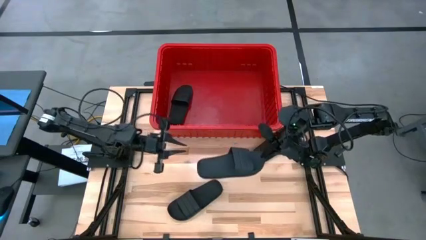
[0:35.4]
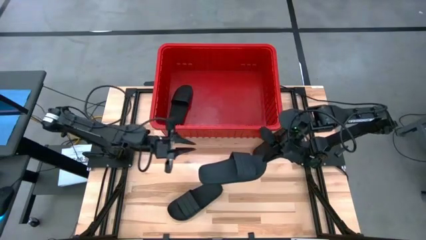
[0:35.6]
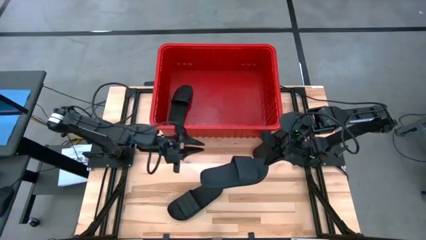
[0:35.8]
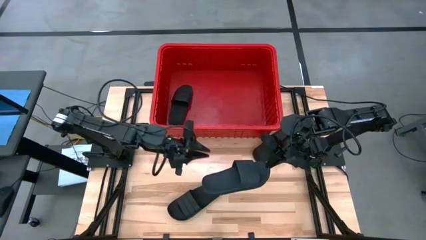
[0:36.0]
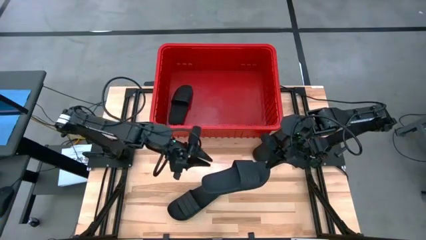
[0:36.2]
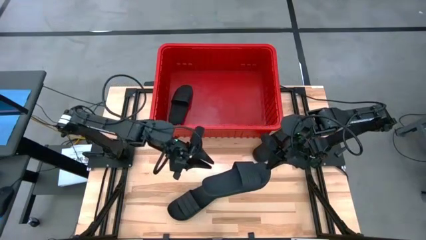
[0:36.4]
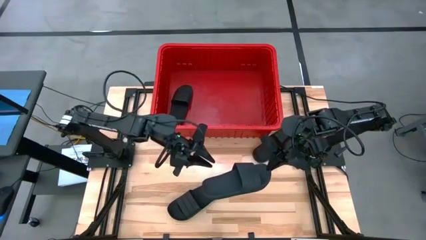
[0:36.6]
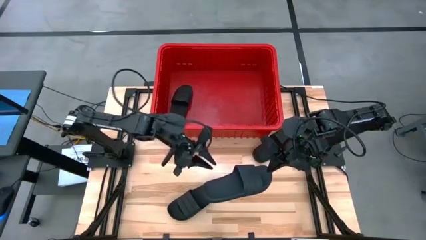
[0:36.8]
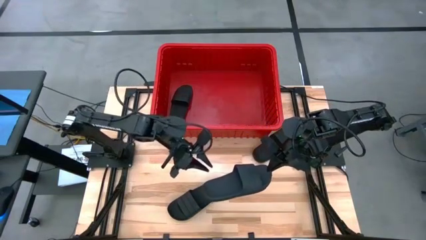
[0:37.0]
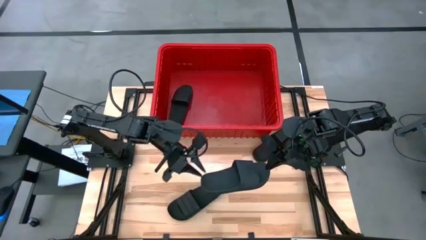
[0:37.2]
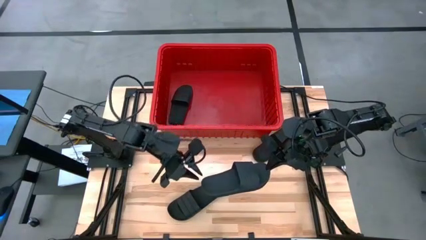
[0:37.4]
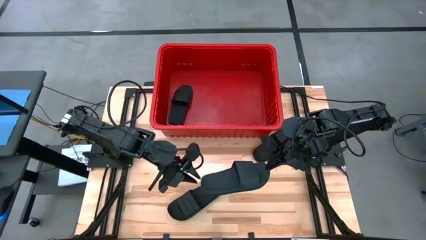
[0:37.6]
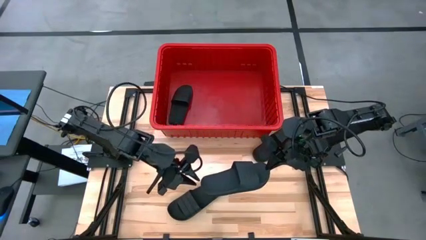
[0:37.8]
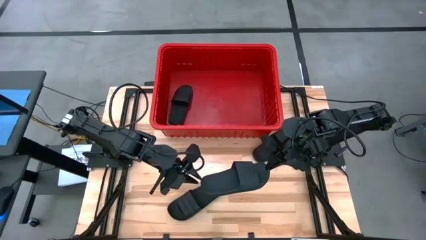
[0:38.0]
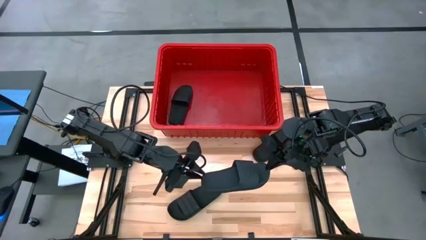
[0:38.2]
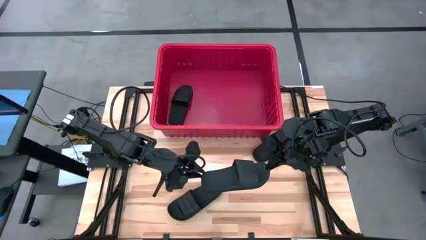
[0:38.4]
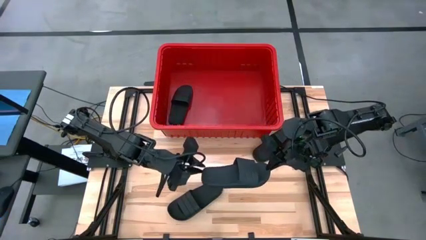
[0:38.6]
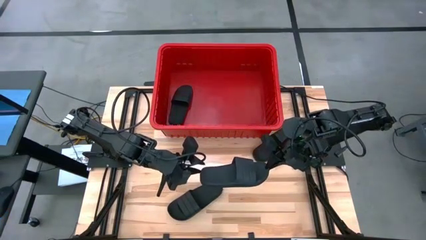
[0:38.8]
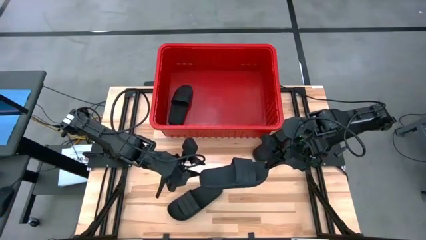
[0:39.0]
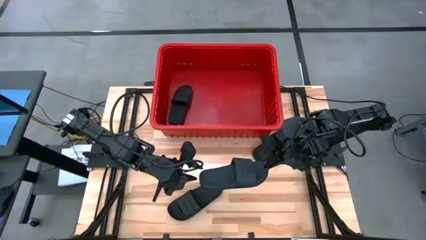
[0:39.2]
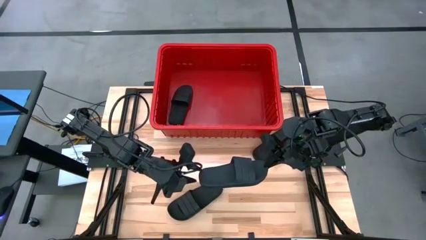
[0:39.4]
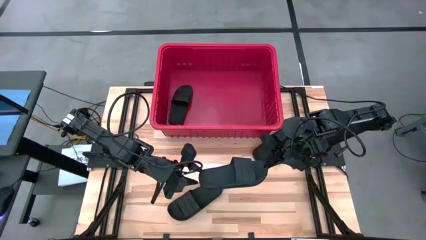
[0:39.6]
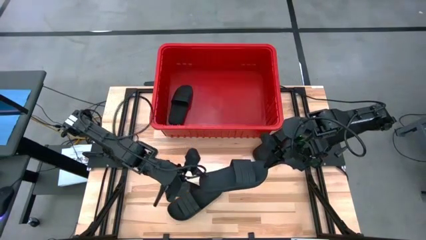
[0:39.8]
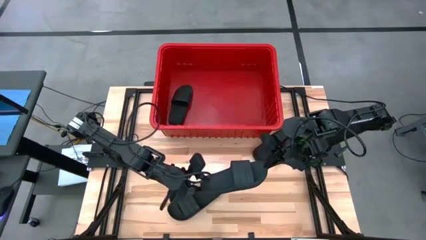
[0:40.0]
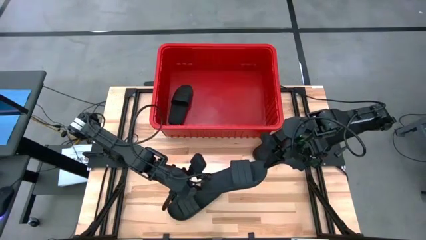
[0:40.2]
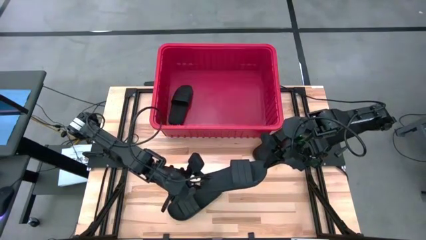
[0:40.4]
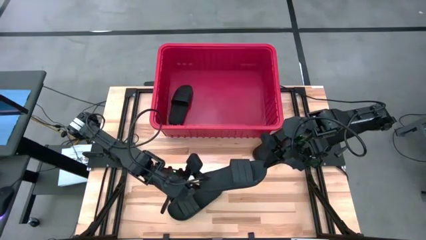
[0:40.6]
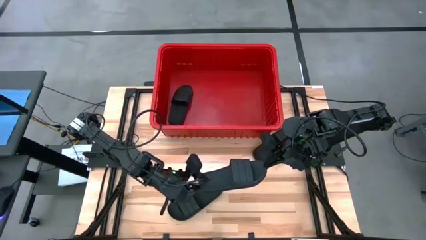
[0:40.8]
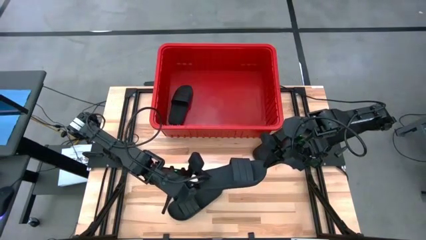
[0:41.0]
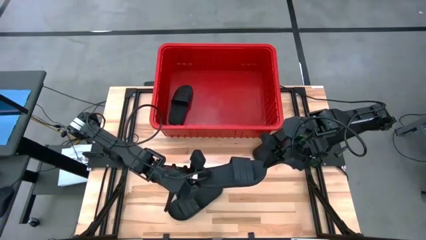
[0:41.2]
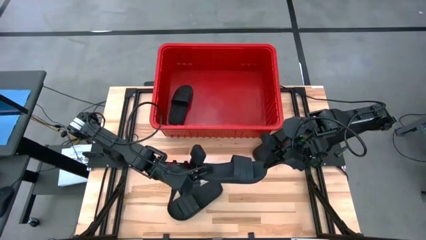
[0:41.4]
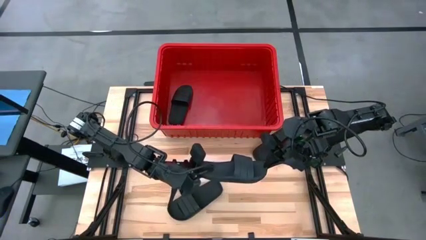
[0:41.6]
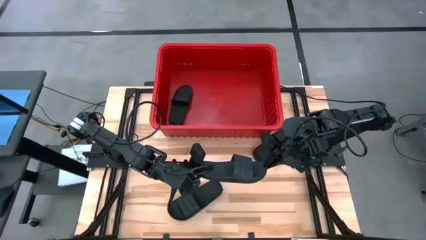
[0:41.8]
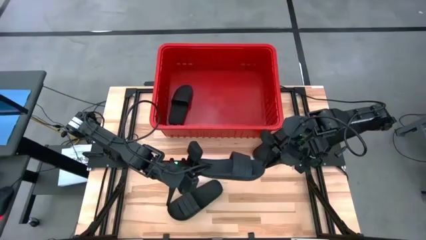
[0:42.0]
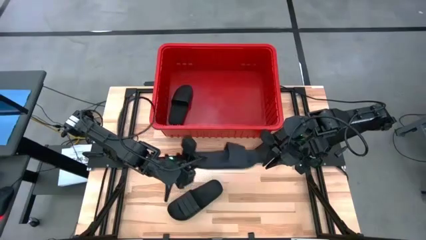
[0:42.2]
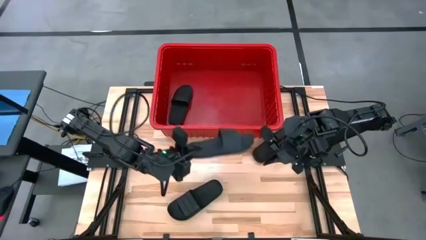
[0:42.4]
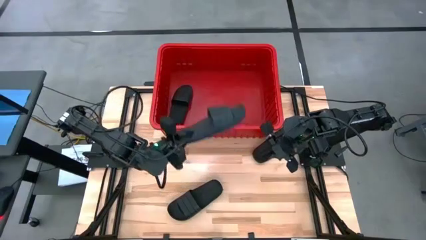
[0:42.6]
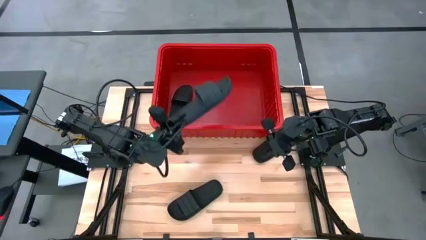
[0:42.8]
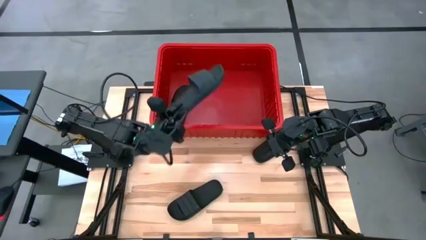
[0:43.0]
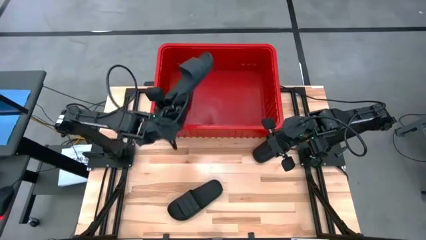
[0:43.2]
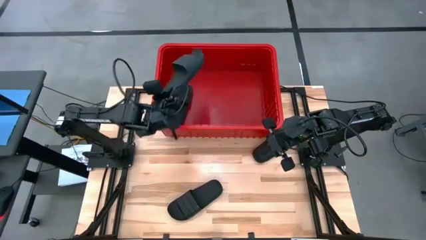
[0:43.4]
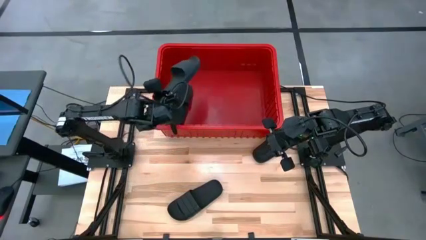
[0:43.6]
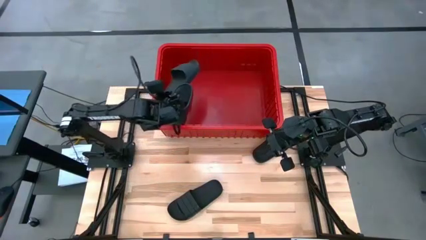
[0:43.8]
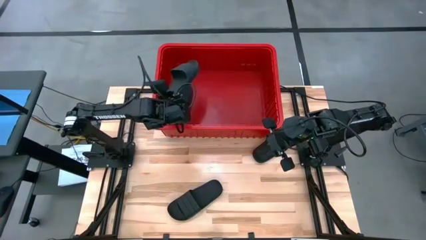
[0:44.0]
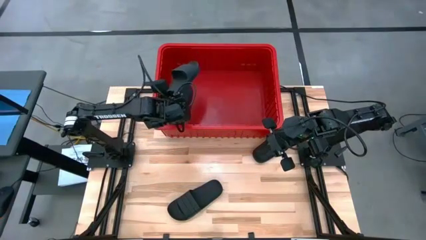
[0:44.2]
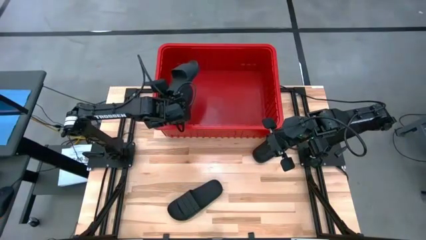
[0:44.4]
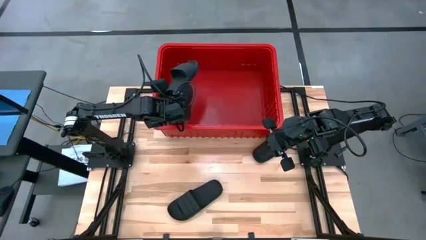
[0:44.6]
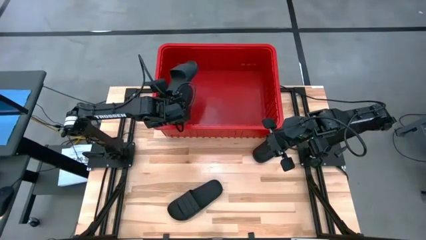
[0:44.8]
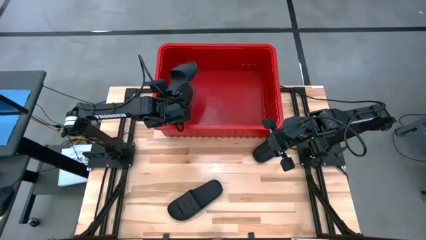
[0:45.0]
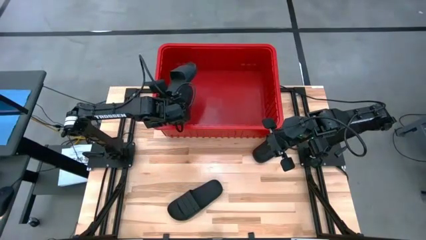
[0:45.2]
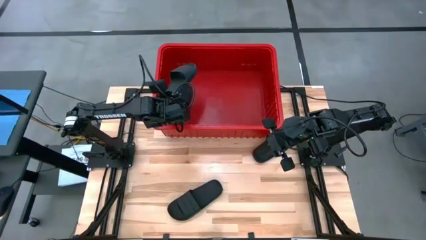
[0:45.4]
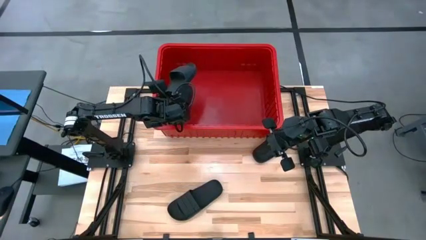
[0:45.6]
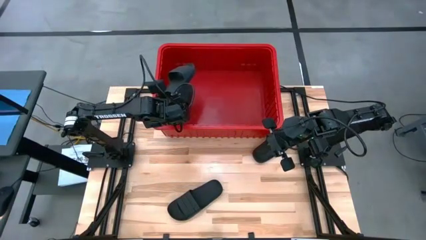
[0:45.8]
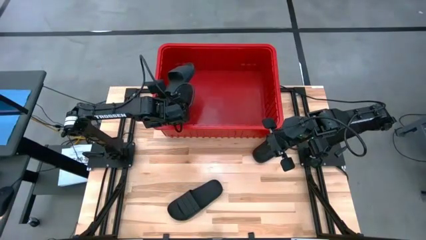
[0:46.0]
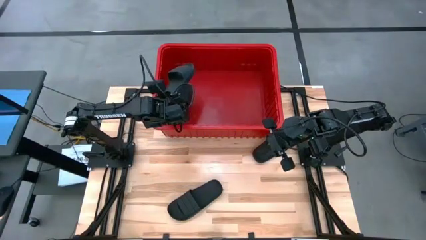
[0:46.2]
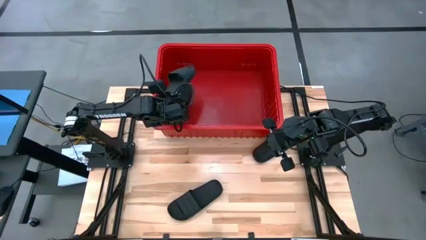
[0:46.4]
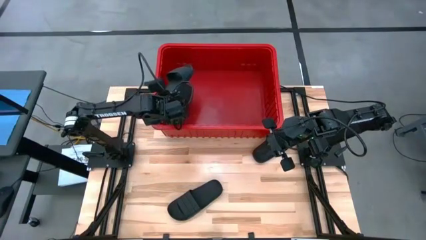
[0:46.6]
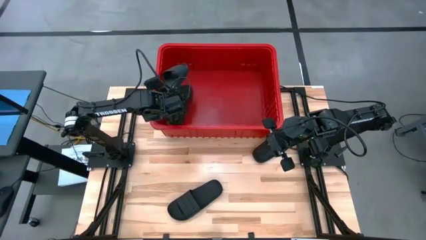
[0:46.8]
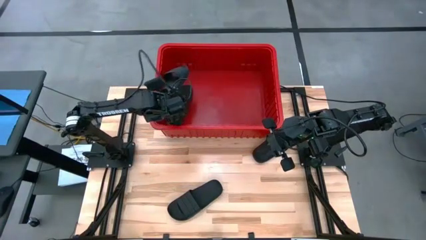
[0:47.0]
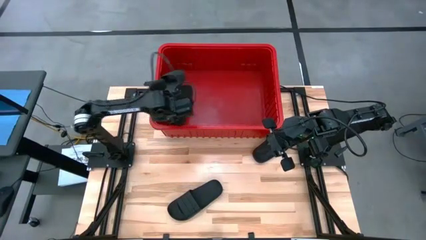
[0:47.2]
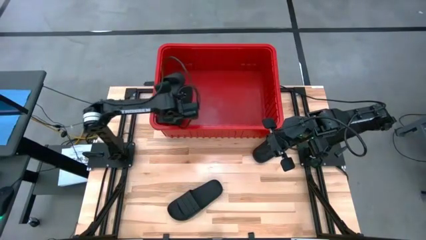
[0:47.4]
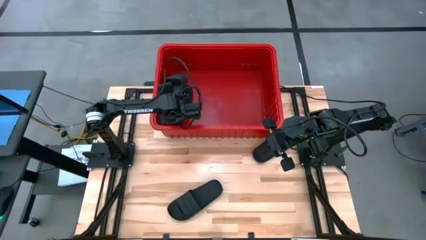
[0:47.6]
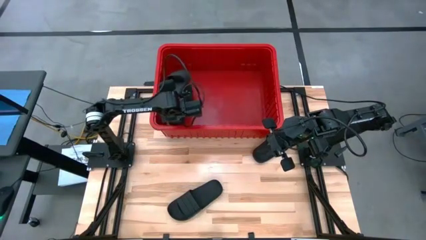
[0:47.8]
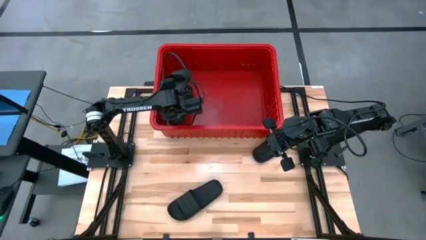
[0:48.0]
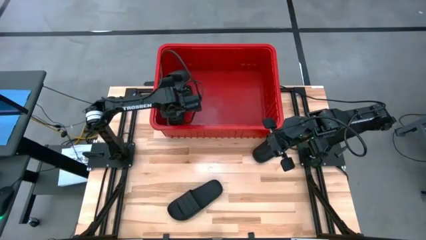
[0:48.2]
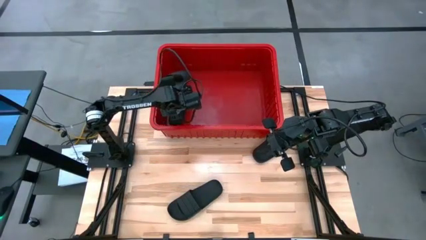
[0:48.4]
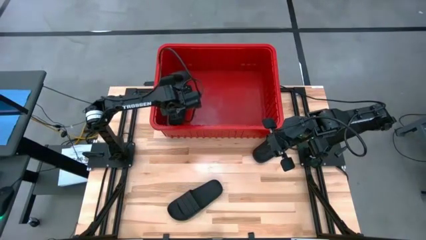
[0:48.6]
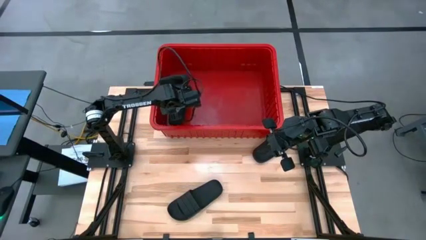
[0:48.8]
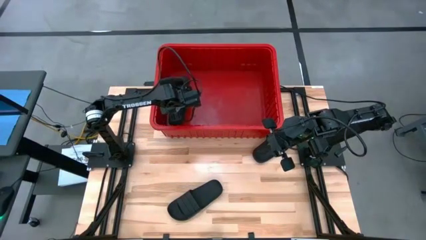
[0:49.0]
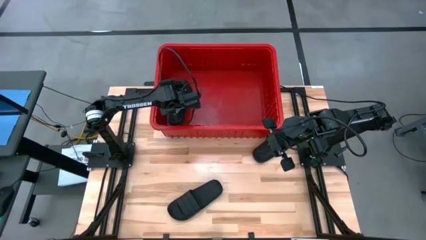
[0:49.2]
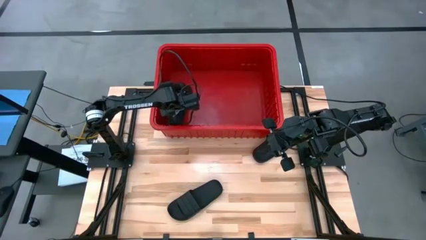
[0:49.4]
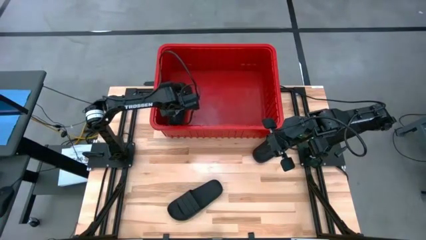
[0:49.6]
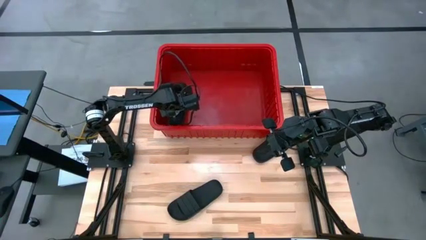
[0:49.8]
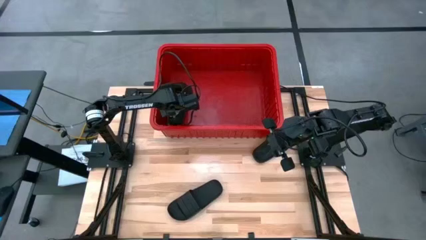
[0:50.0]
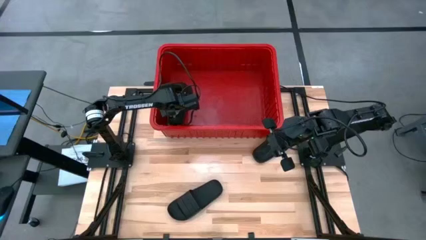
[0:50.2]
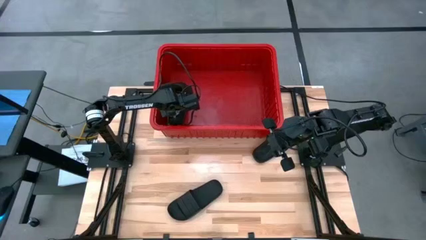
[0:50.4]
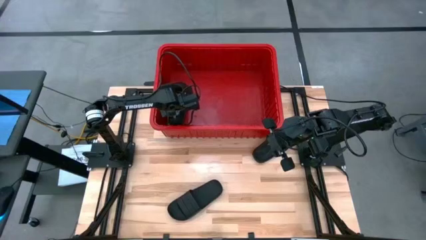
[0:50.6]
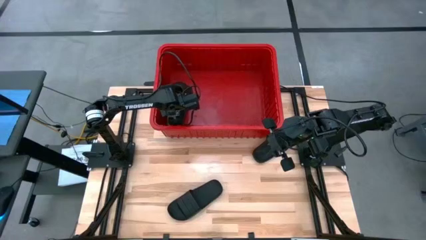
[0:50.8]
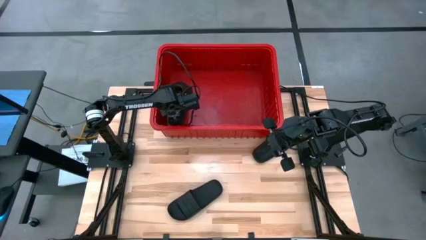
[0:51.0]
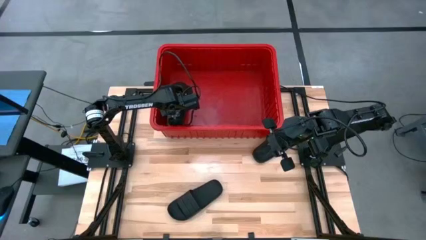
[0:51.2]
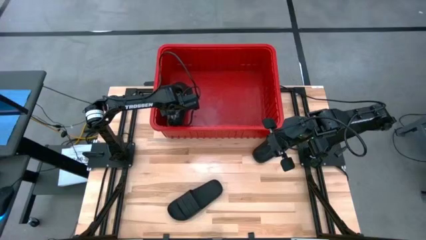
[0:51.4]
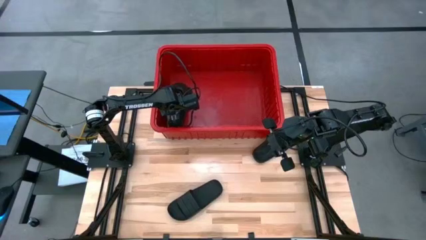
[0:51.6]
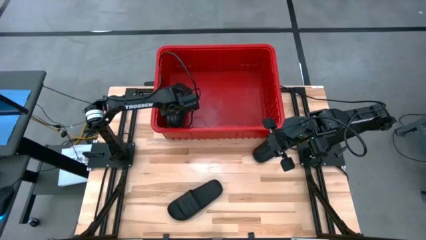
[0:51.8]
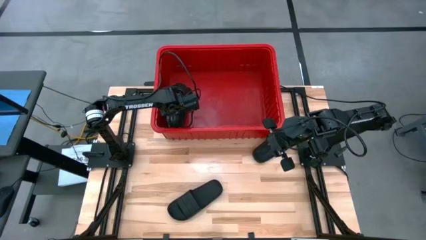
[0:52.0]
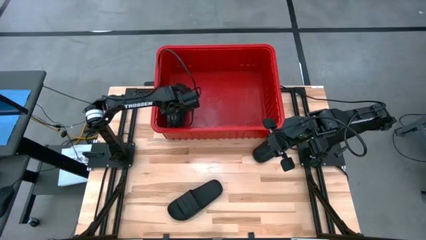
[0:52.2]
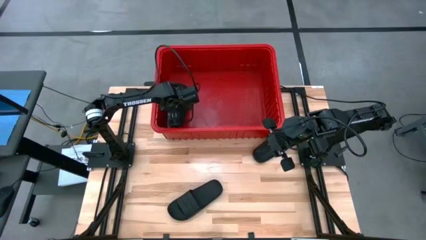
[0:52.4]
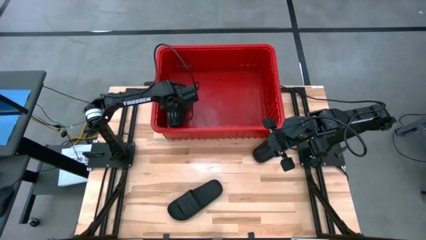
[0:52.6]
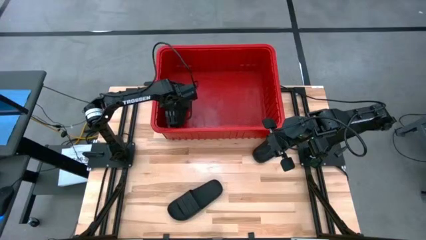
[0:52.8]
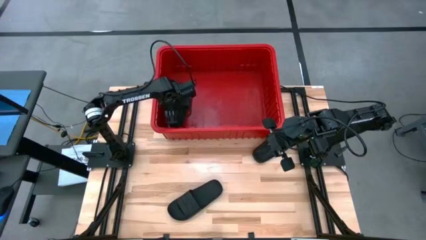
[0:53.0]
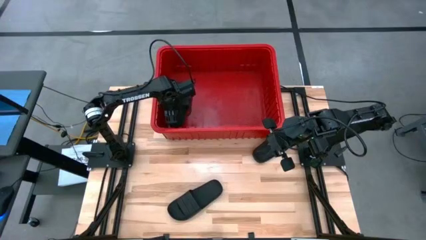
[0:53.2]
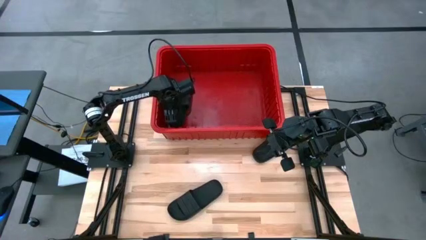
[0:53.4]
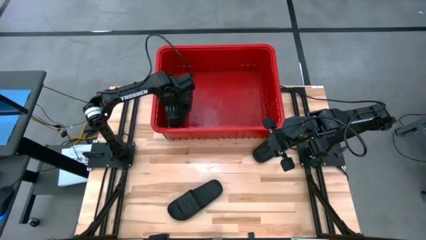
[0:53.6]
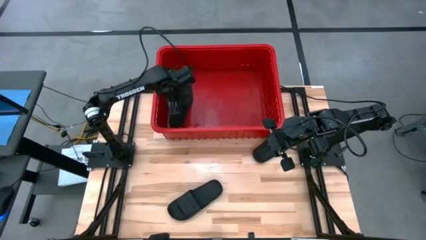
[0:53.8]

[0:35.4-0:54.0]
Task: Pick and place slides into bin
Stack the middle slide on top of the slide in the bin
